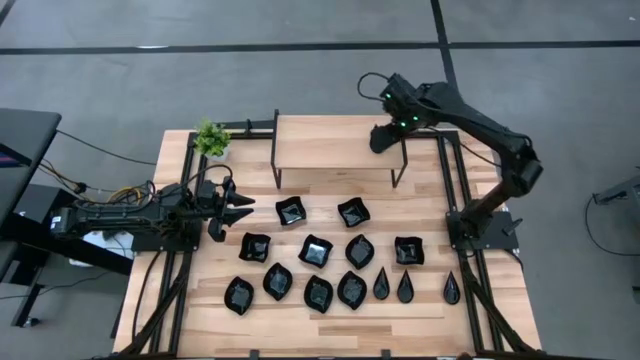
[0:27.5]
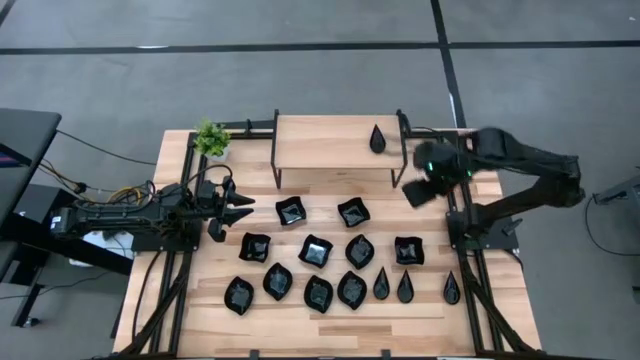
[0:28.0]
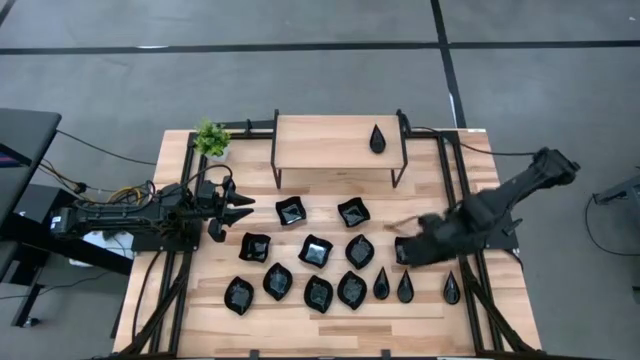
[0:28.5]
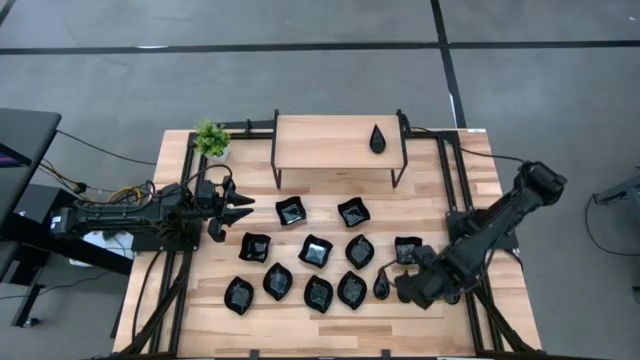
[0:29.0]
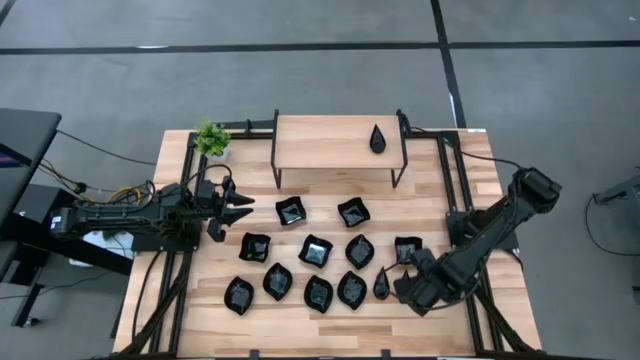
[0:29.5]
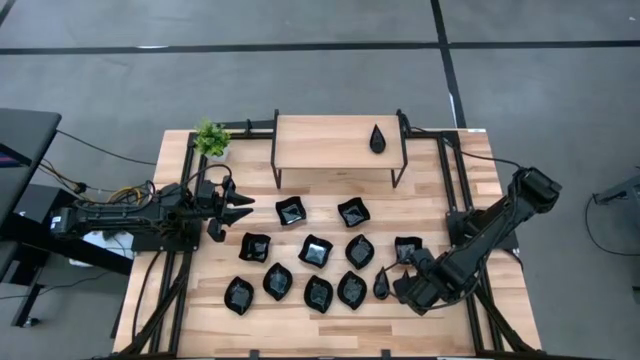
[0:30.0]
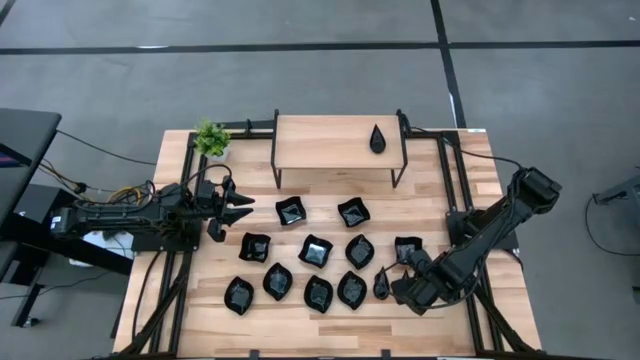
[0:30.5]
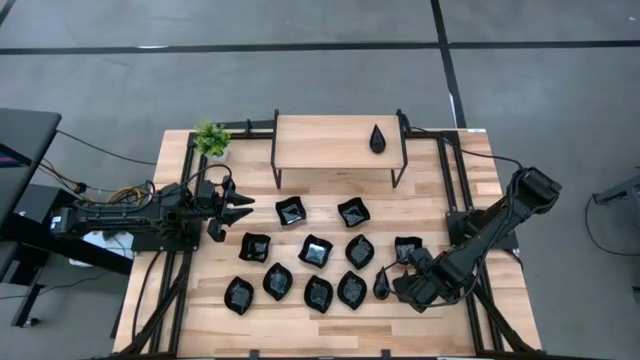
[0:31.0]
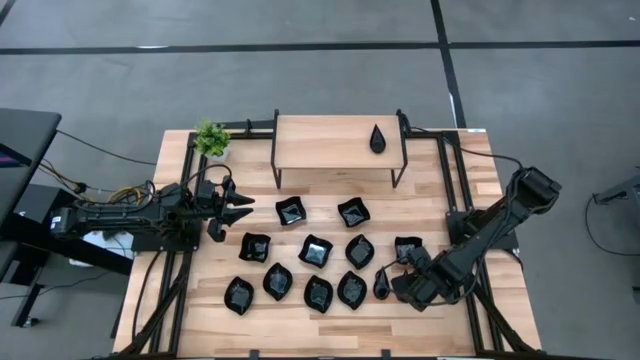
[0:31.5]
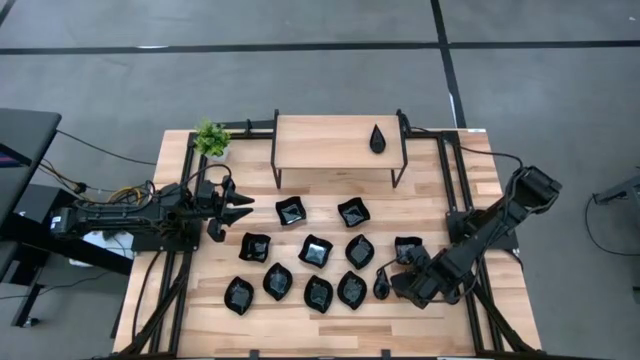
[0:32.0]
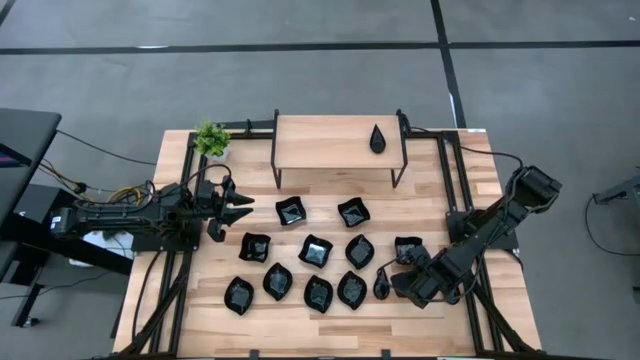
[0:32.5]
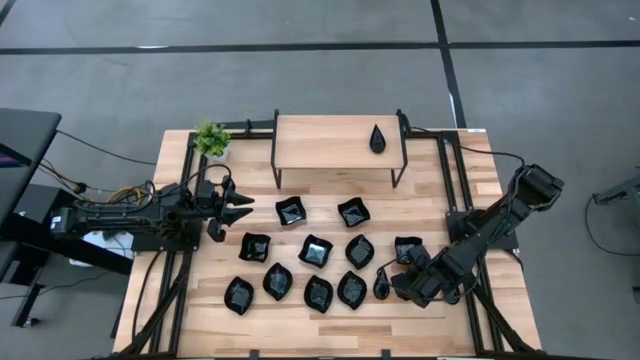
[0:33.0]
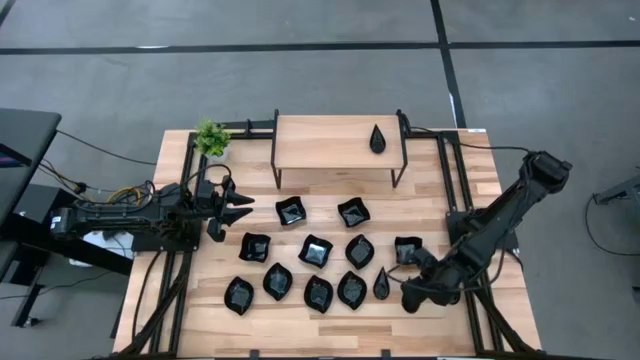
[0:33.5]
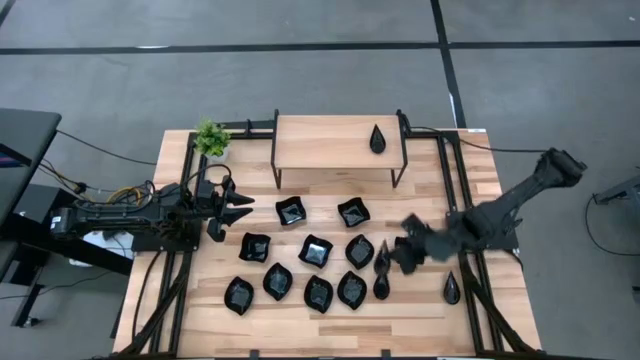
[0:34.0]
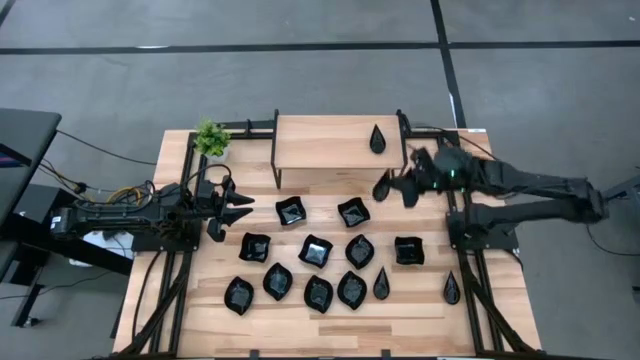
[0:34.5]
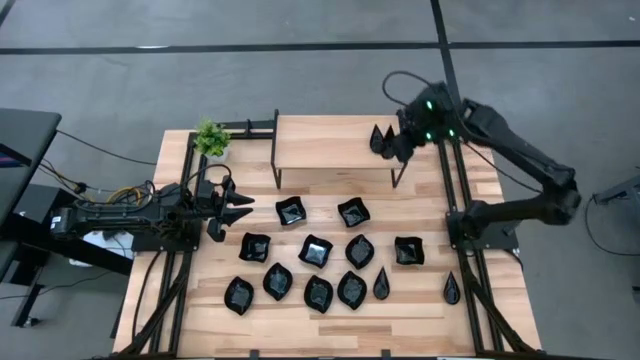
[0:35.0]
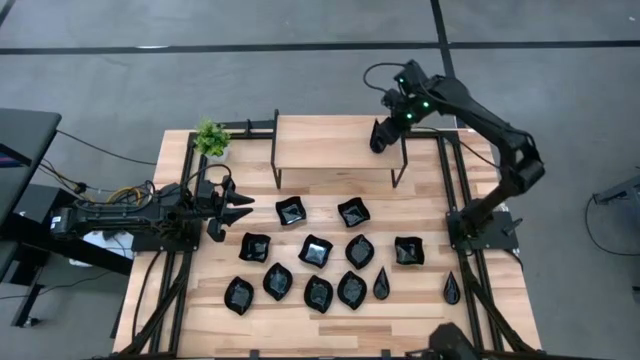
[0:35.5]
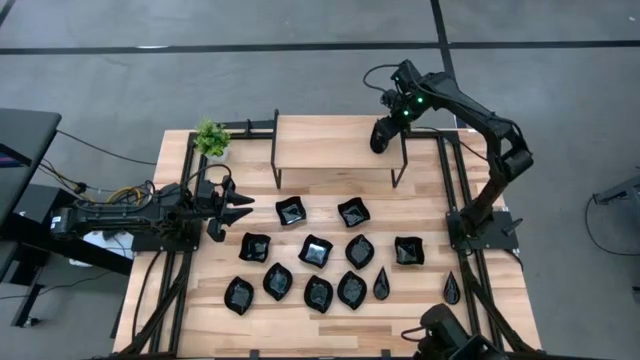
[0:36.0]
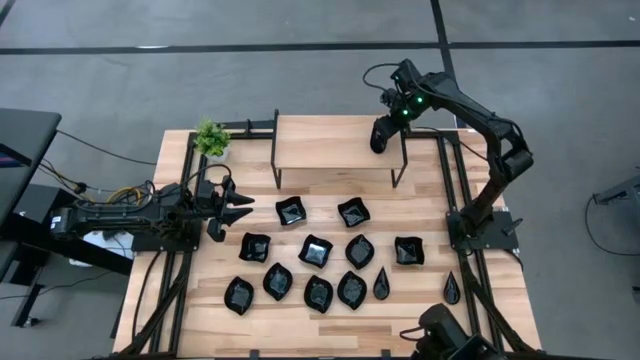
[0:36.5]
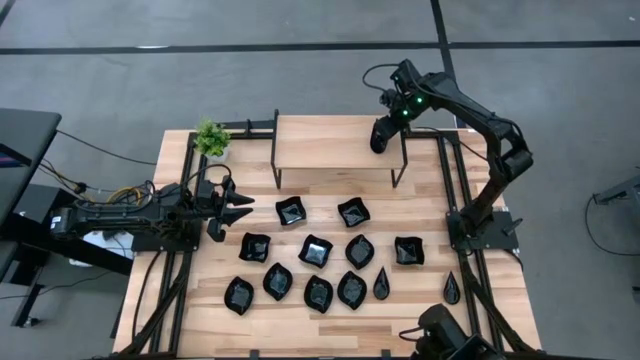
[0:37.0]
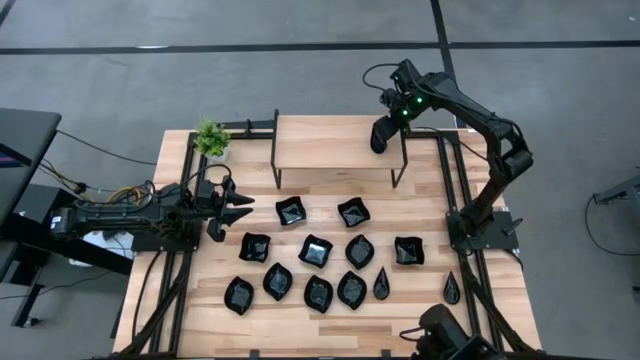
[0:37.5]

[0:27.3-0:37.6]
Task: Pick & Place Mini shaped plates
Stack the drop shaped plate on top of the other drop shaped plate on the shelf

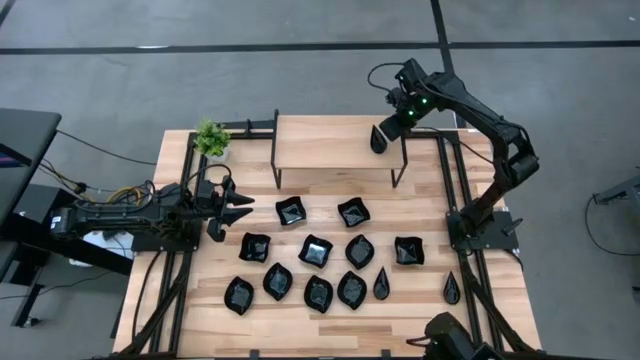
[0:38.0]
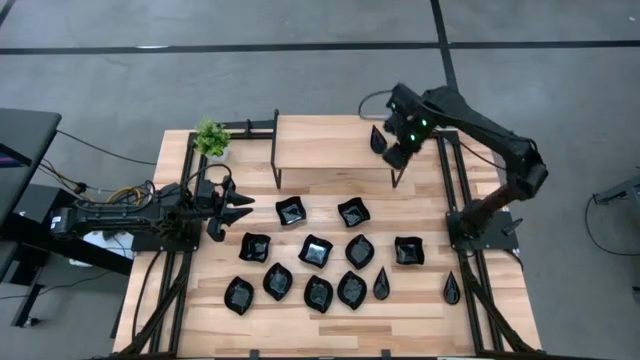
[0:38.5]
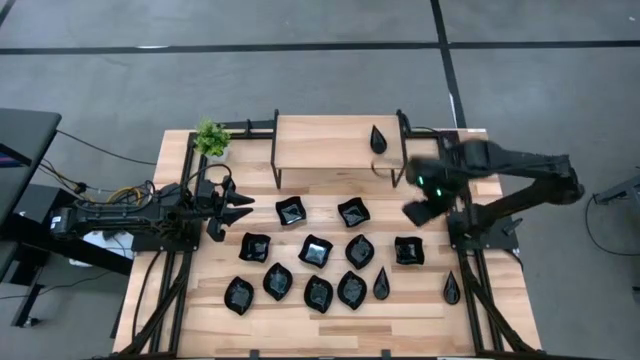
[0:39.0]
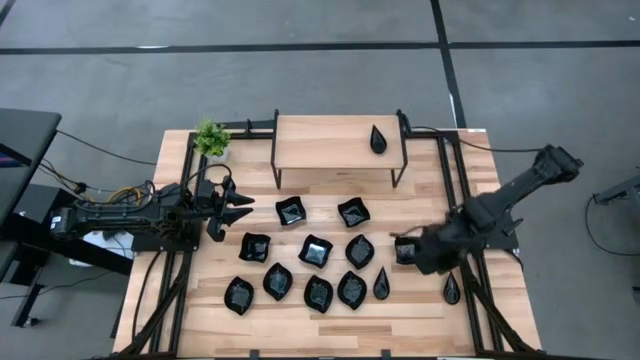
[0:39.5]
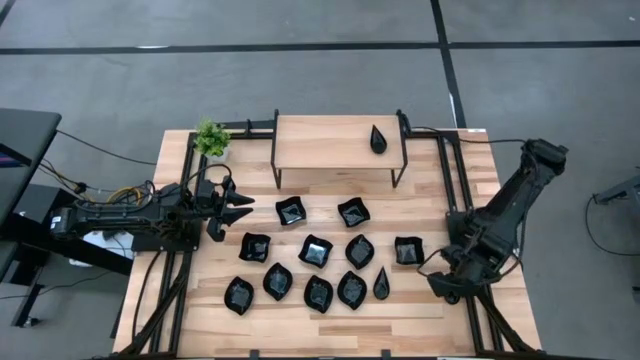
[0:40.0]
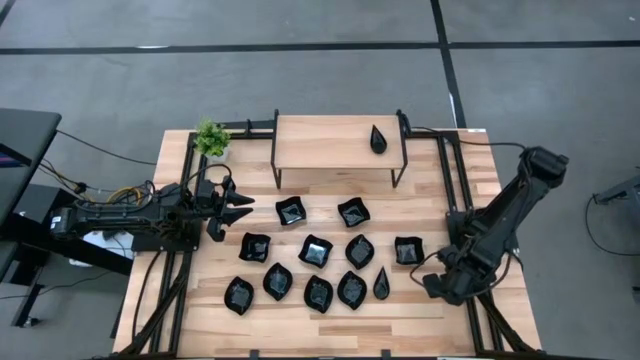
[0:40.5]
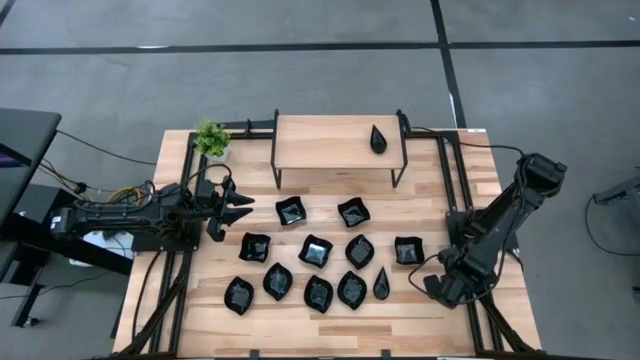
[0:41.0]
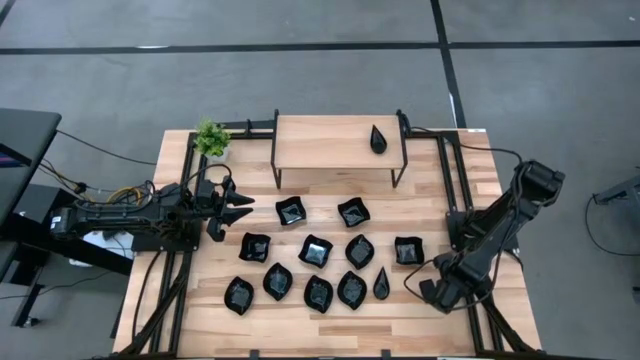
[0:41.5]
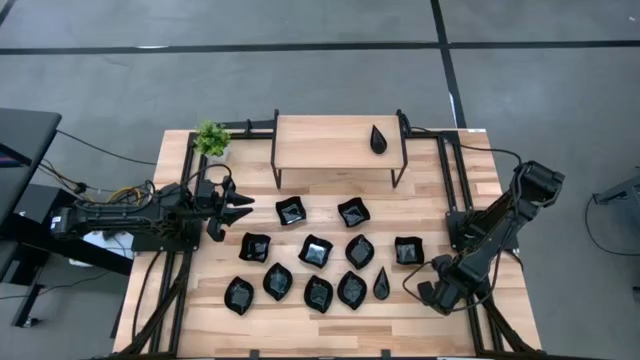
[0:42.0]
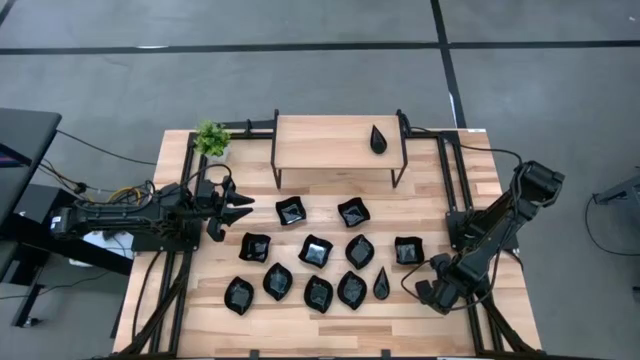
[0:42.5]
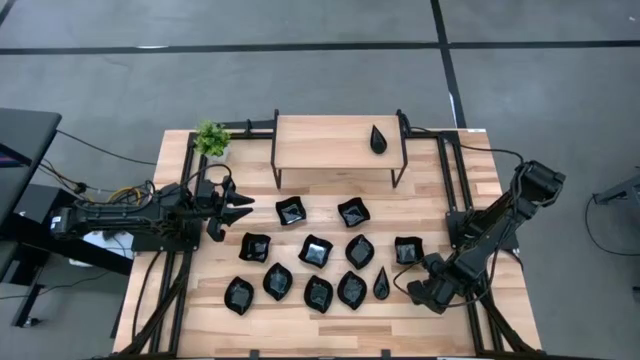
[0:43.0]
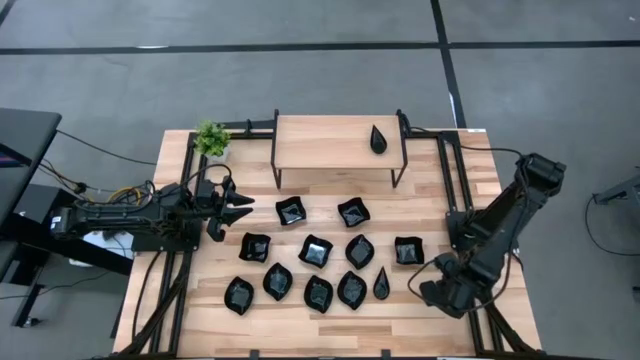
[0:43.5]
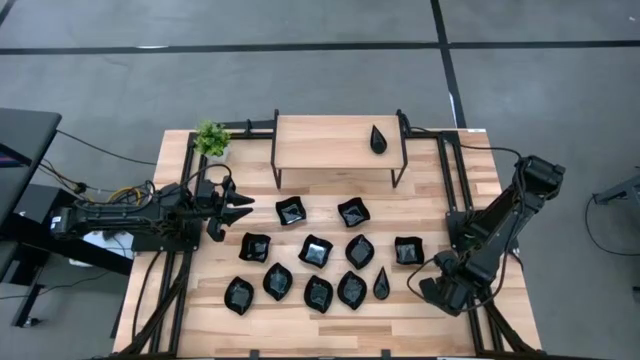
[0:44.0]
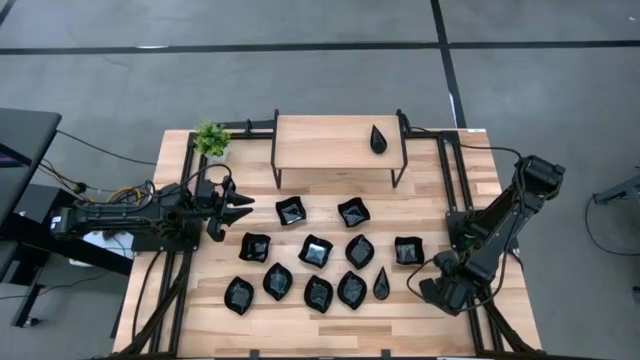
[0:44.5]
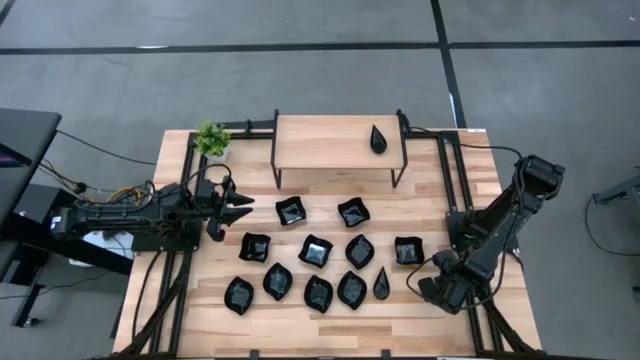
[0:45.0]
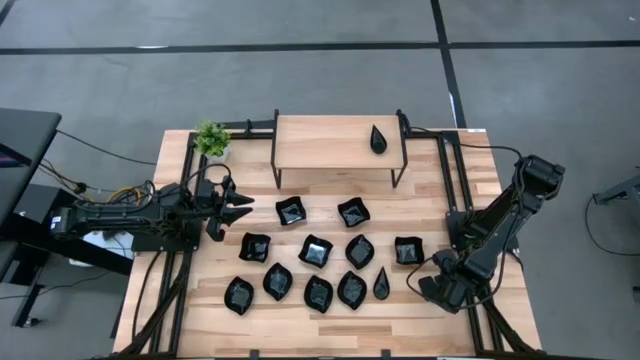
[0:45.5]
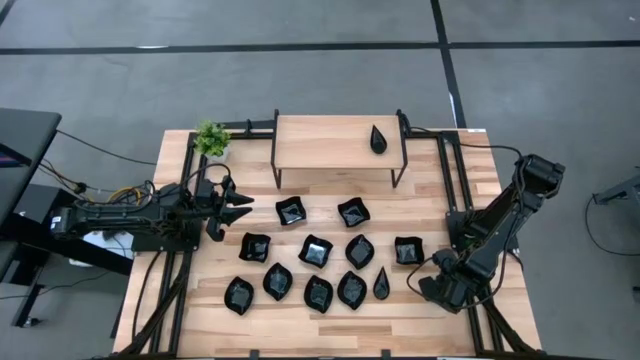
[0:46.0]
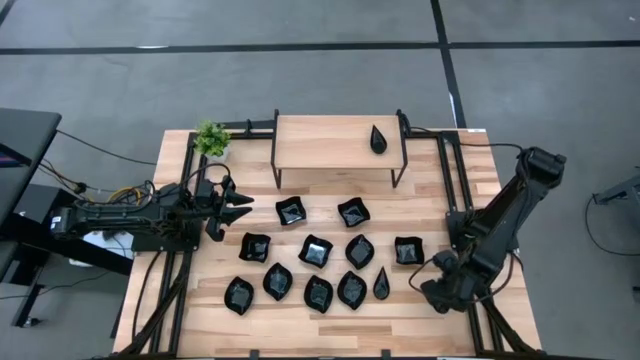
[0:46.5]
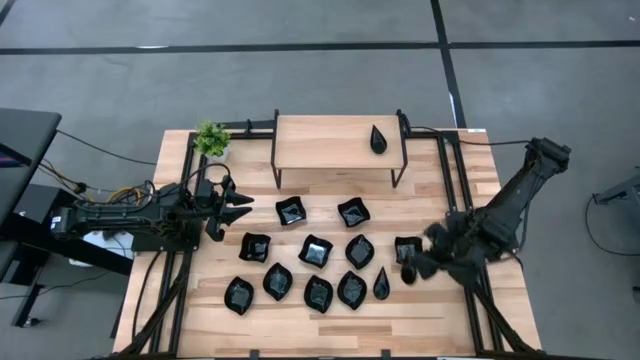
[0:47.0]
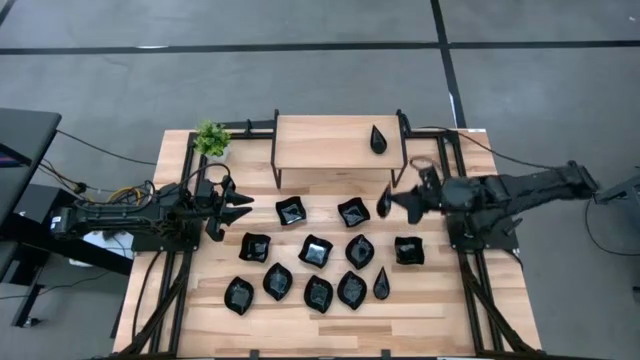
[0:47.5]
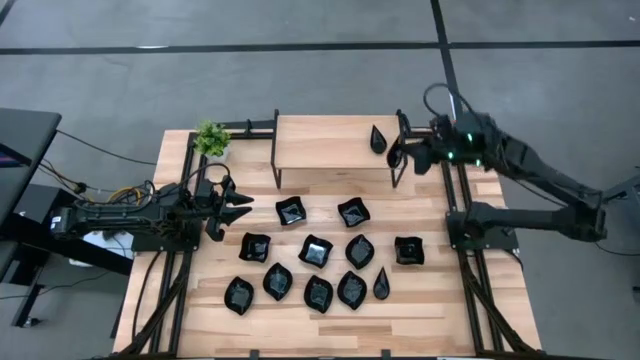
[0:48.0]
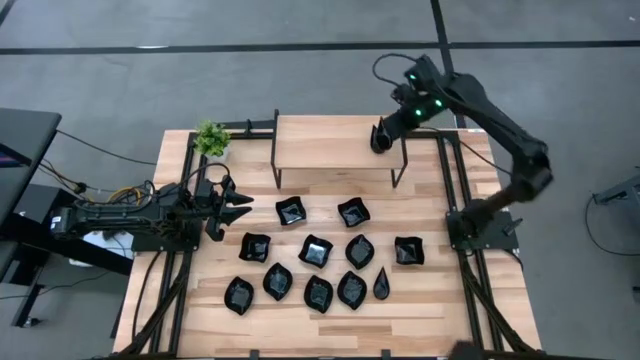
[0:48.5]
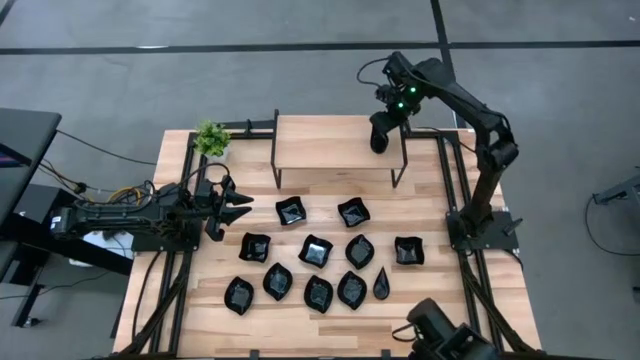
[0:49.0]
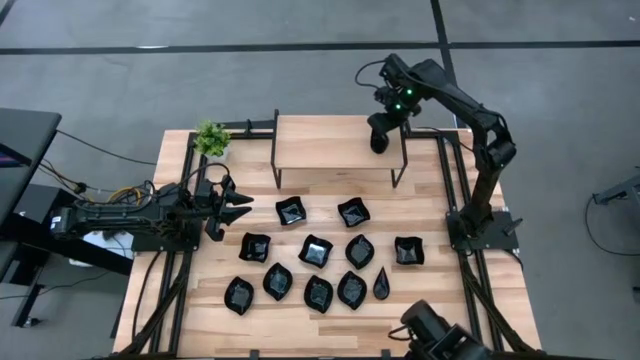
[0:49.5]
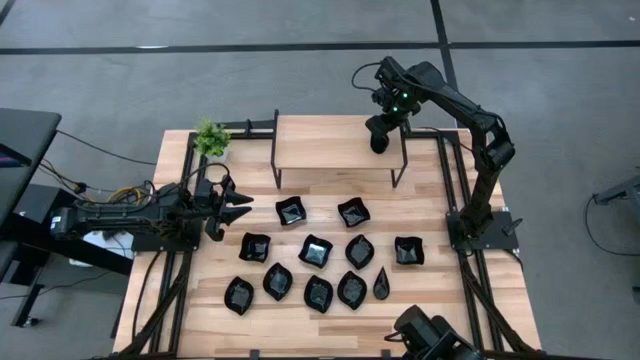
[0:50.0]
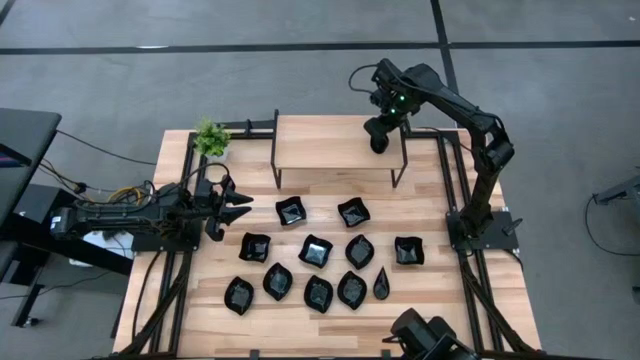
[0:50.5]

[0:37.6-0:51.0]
Stack the drop shaped plate on top of the other drop shaped plate on the shelf
